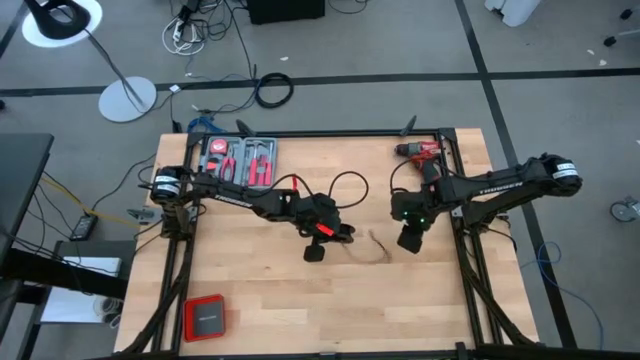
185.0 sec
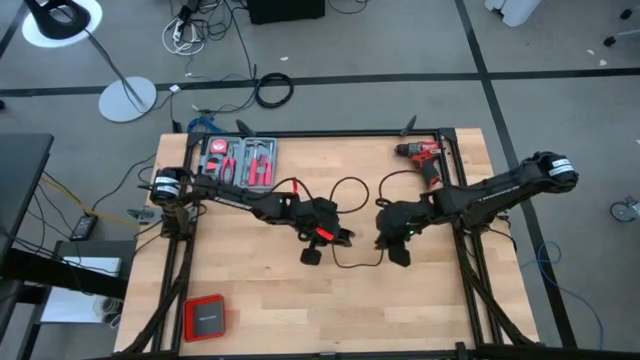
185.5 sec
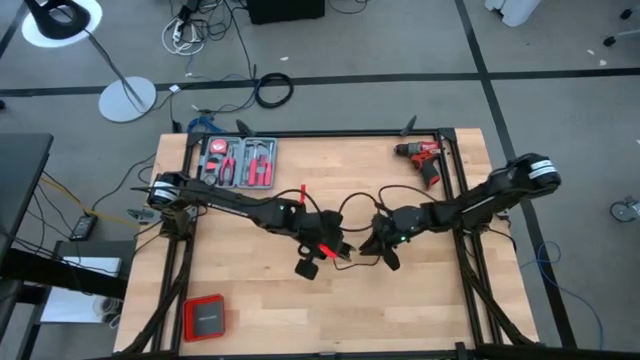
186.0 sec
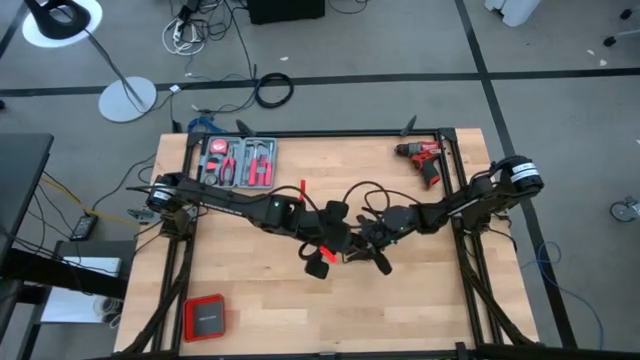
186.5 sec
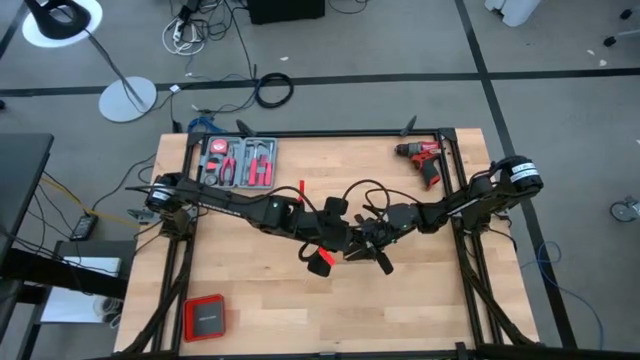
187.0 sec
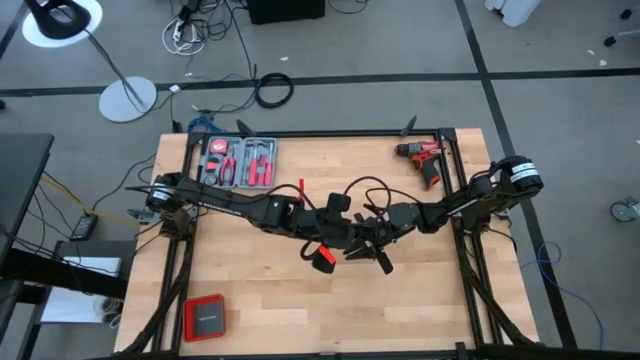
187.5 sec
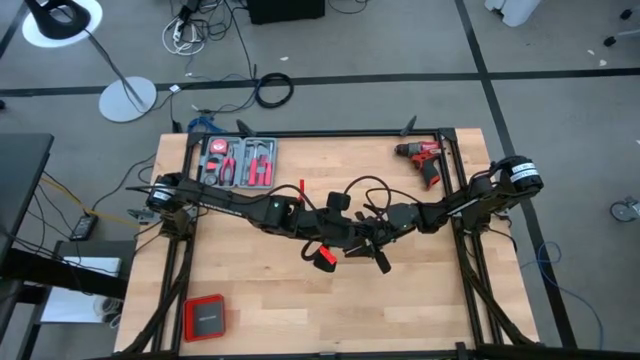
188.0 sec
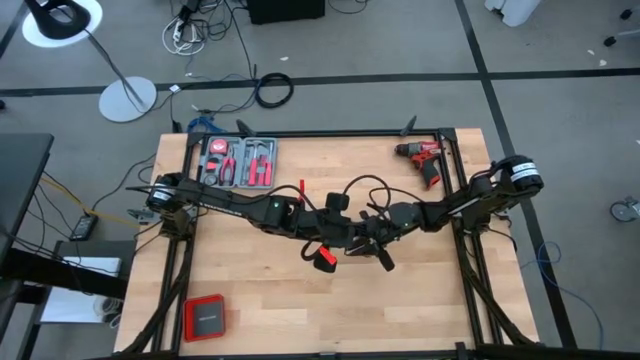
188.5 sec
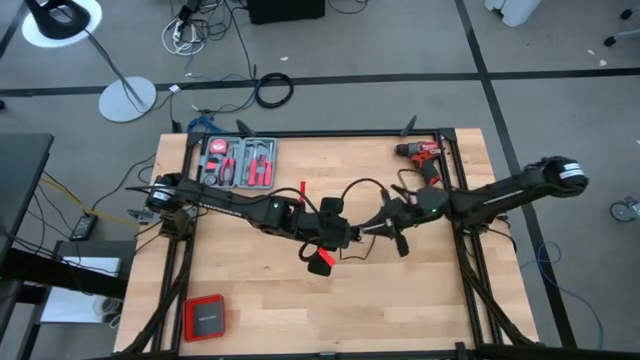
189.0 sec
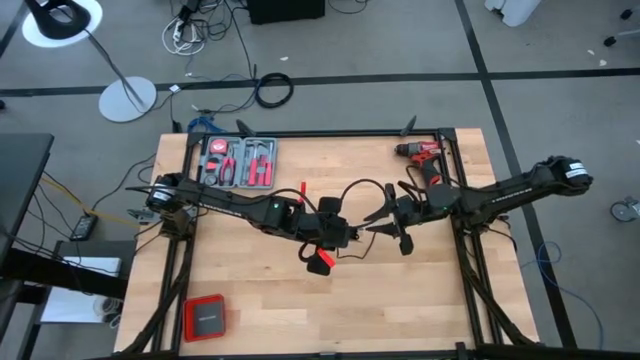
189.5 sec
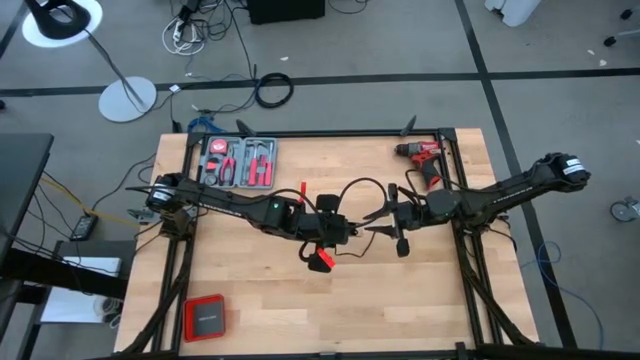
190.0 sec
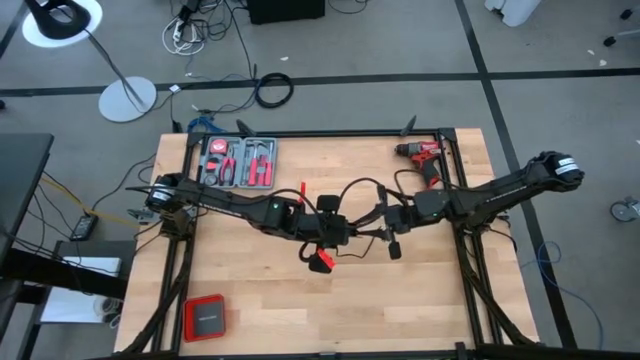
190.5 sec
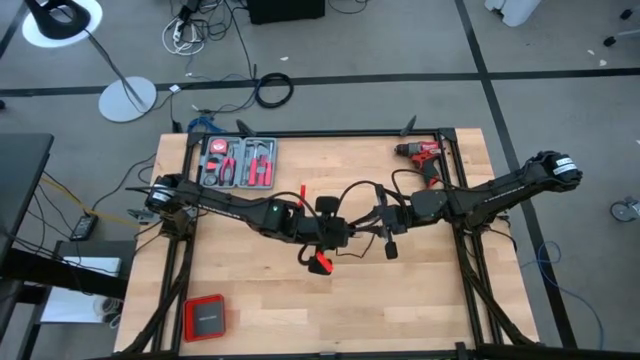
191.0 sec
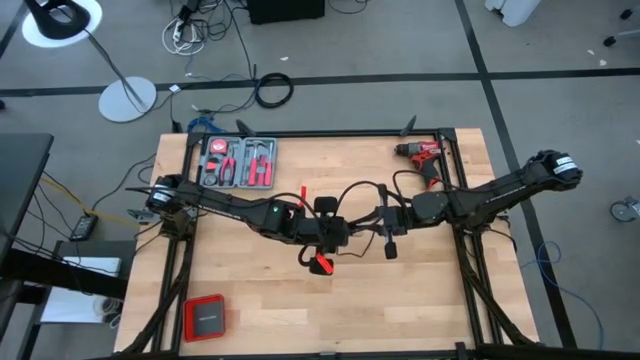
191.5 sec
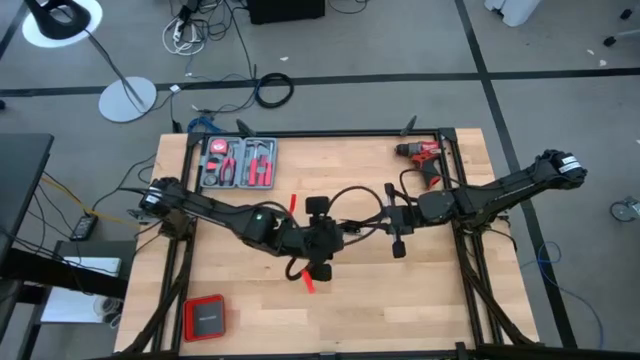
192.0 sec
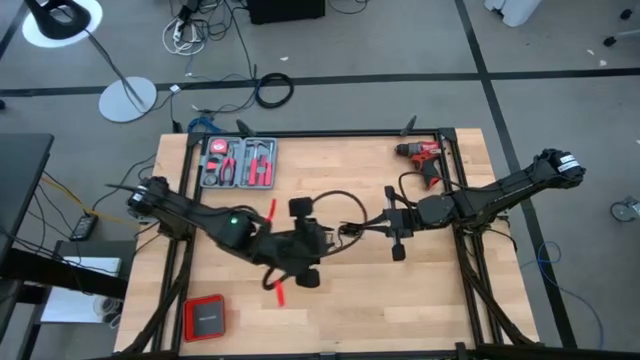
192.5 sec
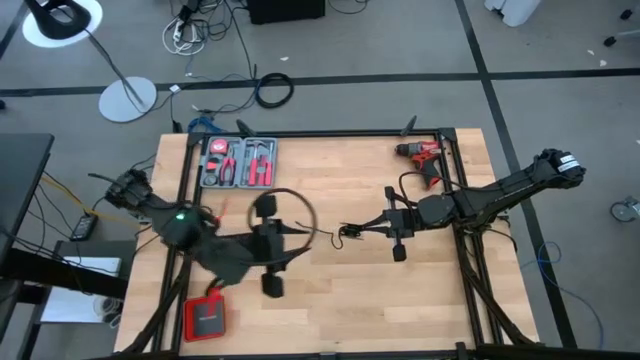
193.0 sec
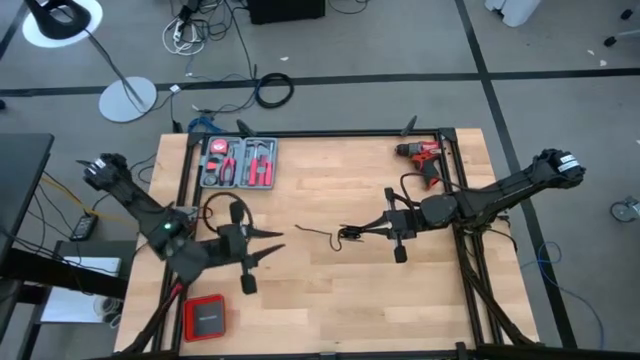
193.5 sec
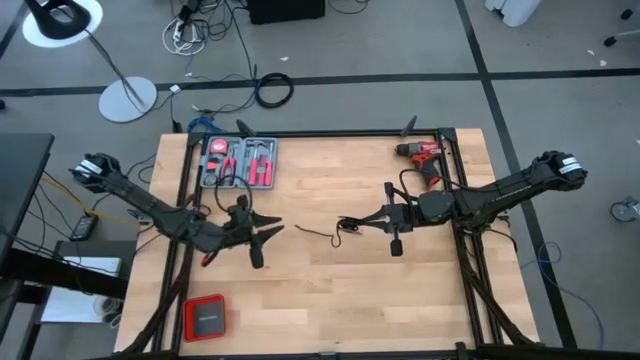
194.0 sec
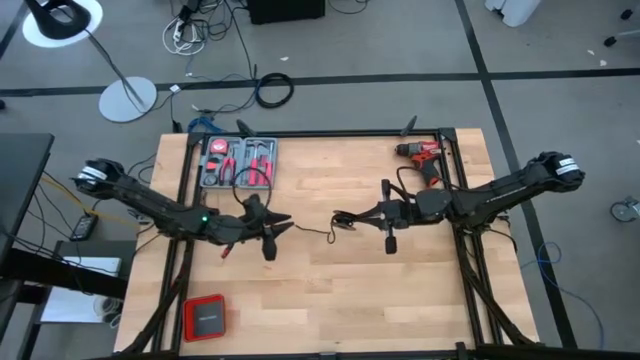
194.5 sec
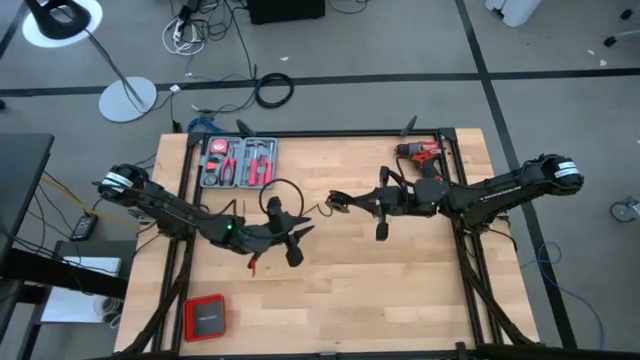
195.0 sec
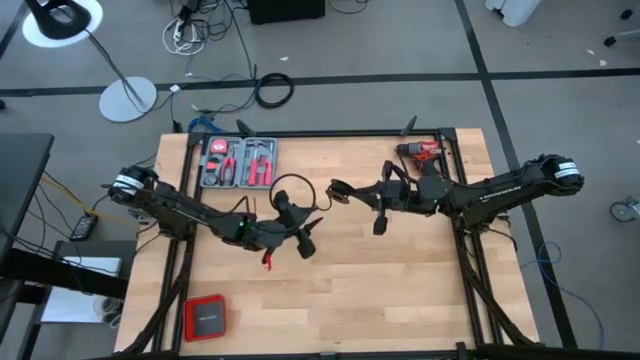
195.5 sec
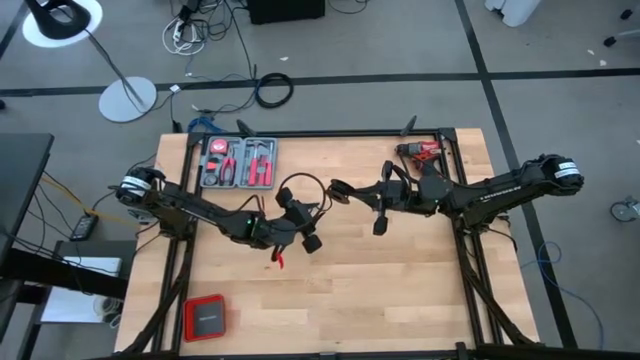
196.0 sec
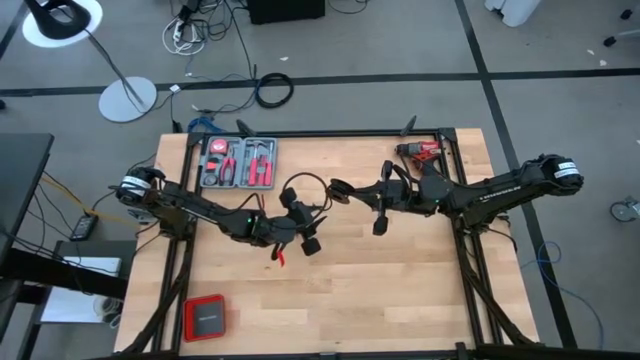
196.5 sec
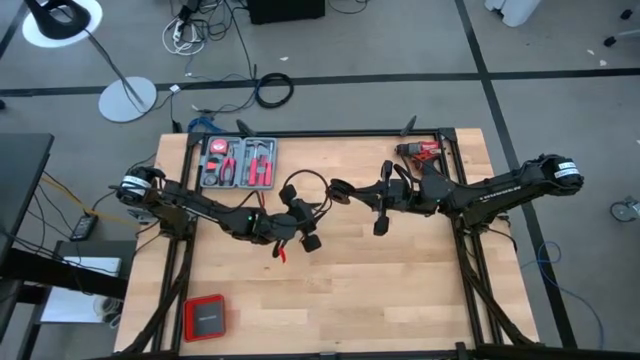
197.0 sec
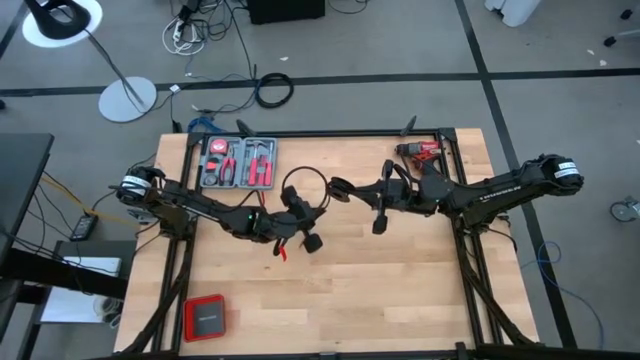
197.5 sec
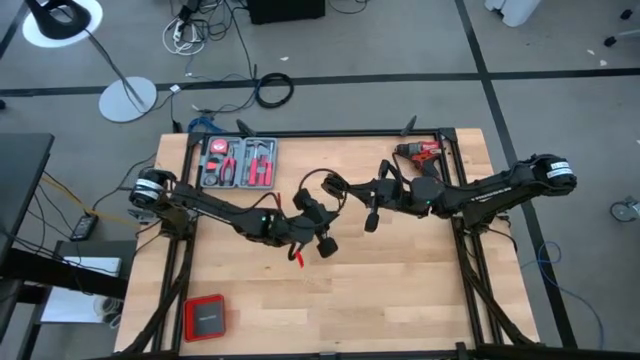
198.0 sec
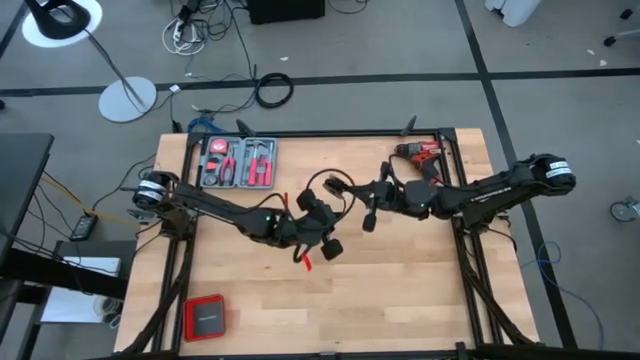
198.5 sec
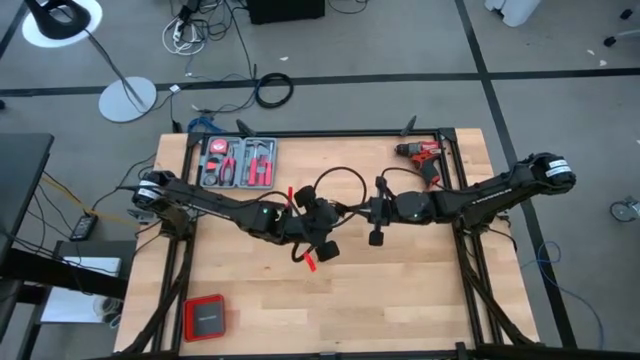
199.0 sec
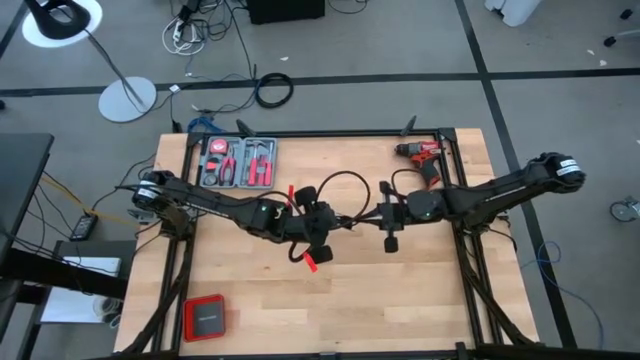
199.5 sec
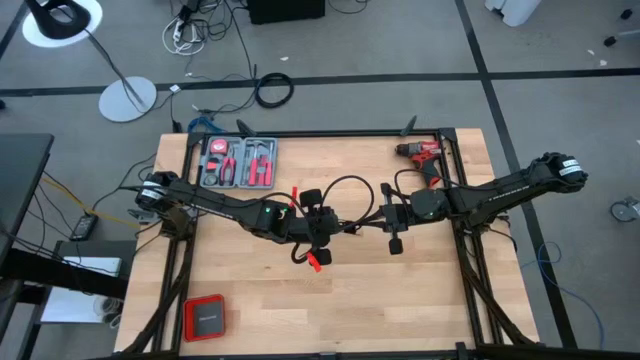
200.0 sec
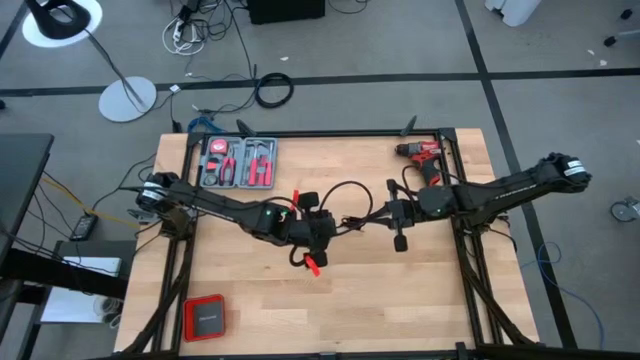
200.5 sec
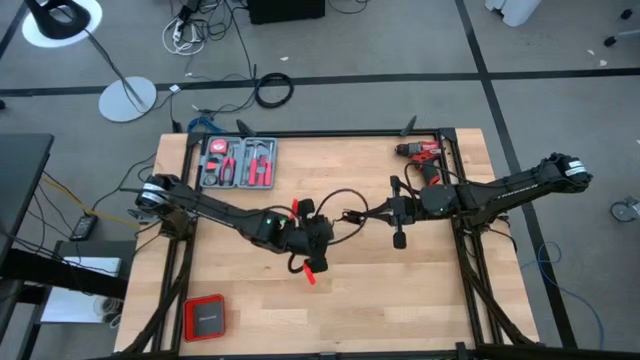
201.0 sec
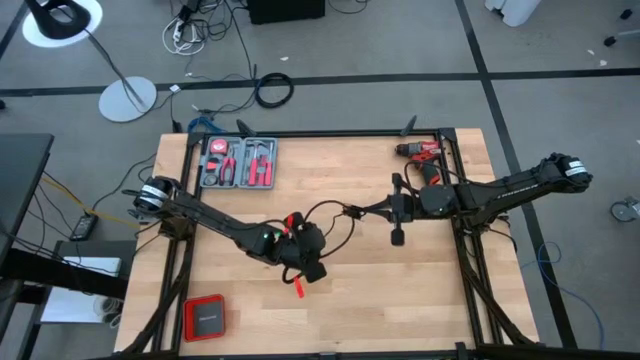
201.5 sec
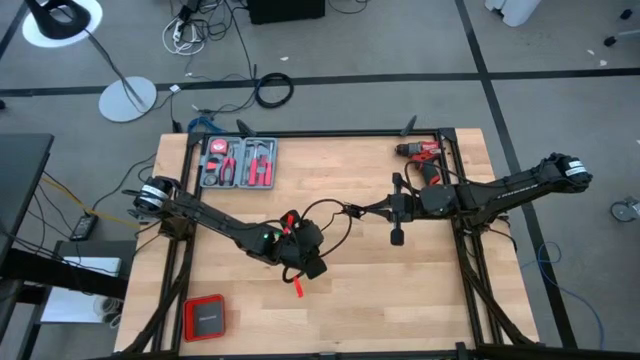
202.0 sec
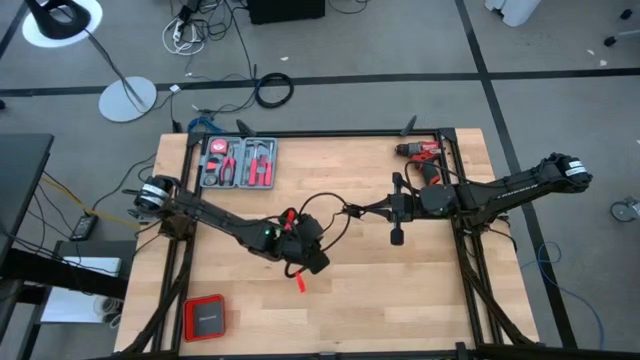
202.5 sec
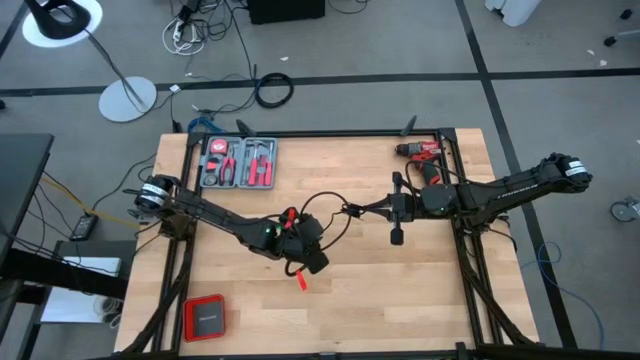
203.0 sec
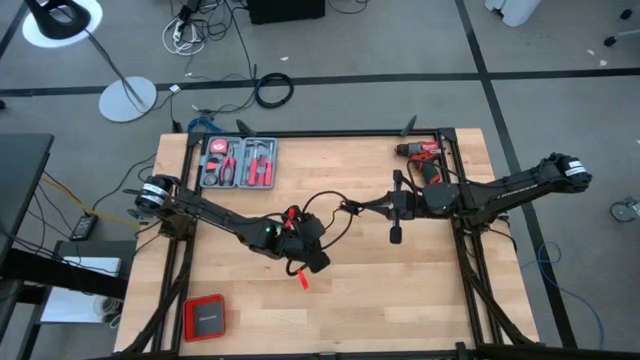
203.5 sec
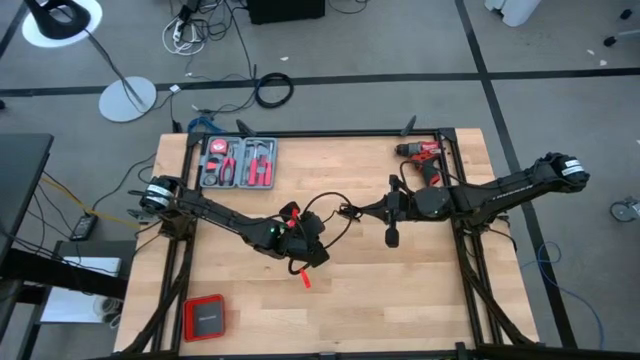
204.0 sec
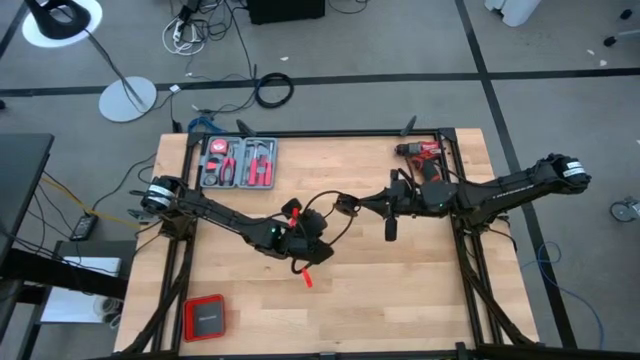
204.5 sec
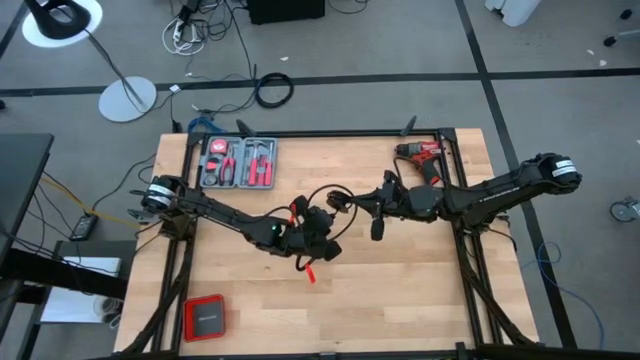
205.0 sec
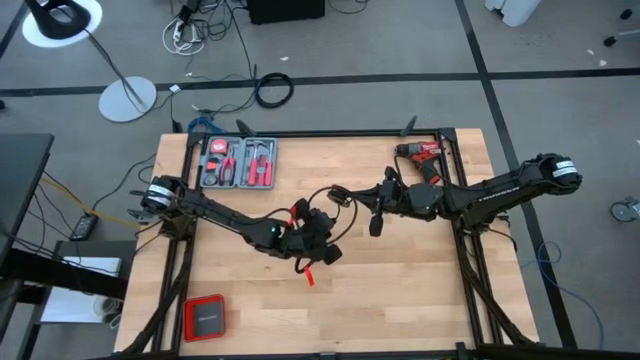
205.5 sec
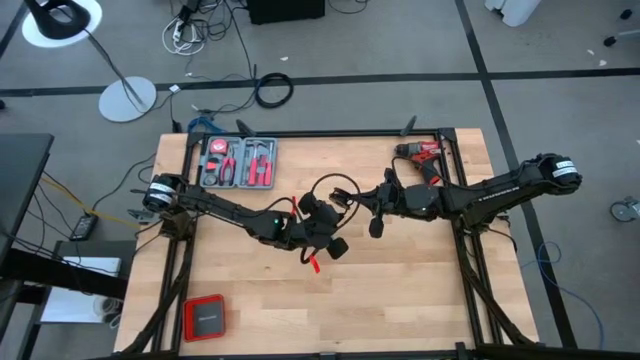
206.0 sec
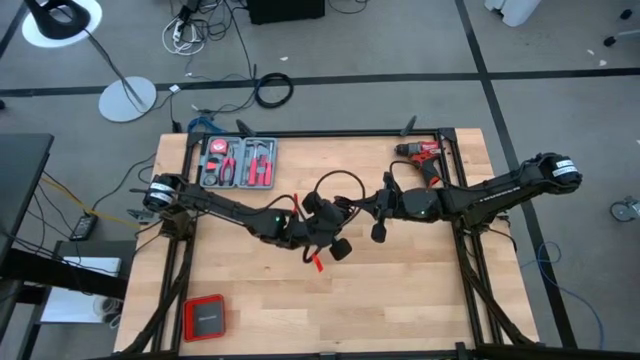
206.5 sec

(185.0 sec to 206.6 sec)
Task: Coil cords
Coil the black wire on the spool
